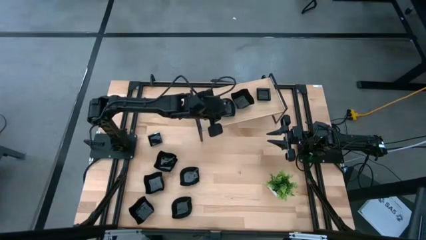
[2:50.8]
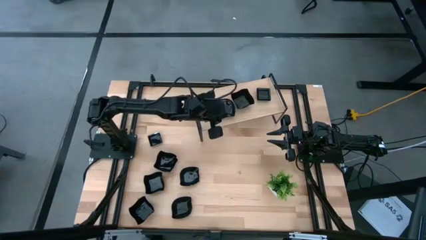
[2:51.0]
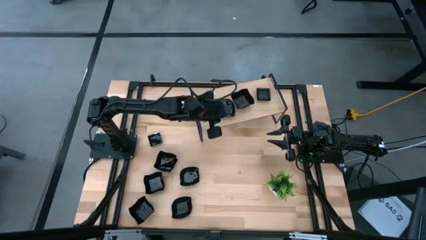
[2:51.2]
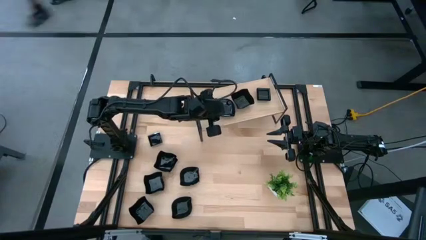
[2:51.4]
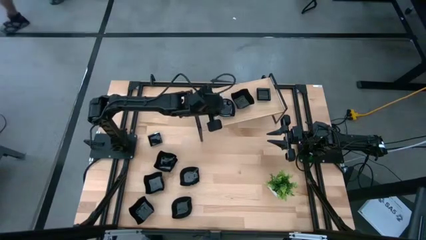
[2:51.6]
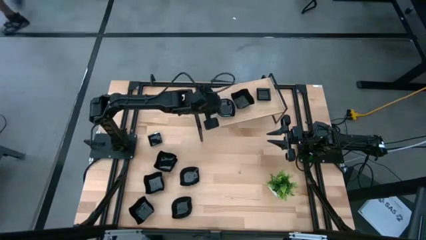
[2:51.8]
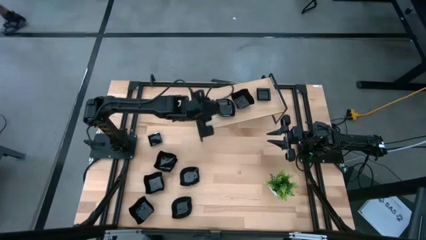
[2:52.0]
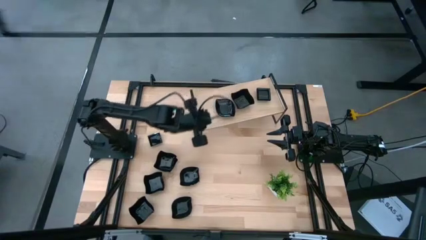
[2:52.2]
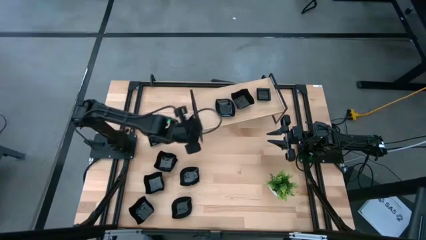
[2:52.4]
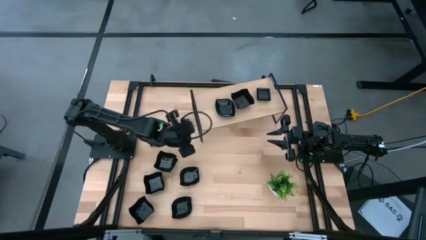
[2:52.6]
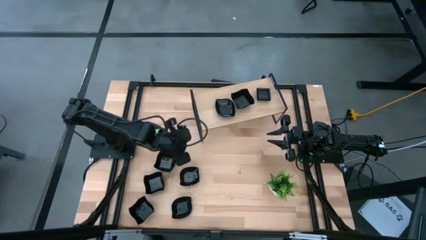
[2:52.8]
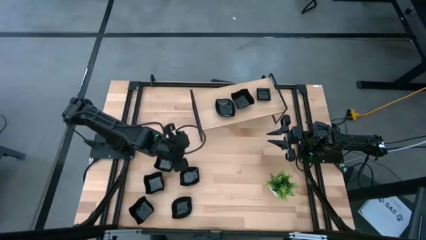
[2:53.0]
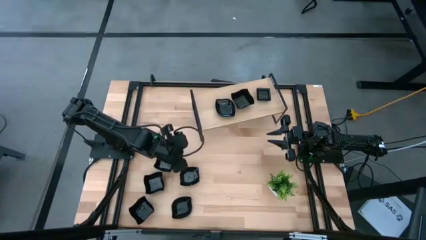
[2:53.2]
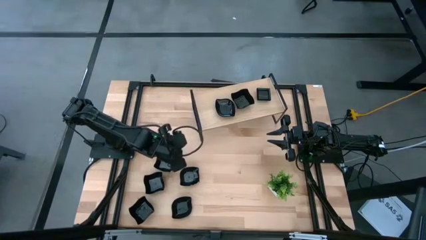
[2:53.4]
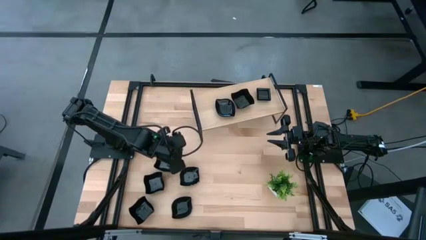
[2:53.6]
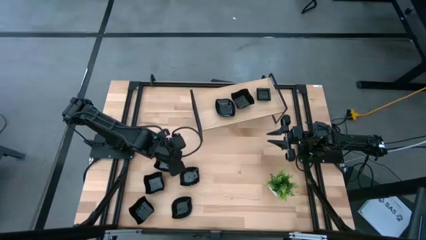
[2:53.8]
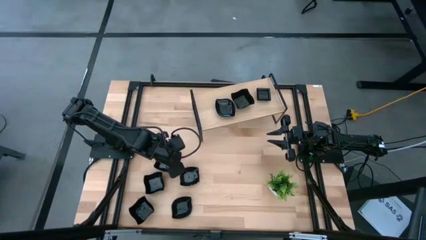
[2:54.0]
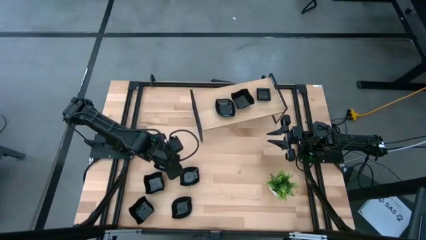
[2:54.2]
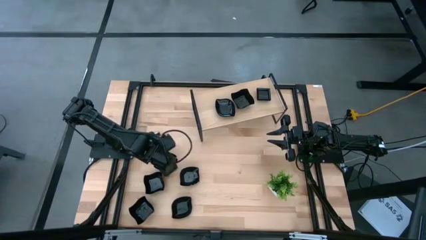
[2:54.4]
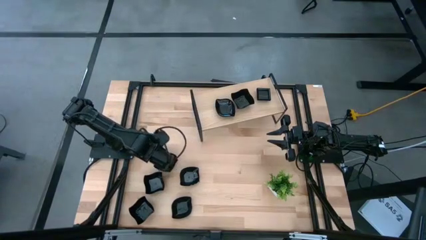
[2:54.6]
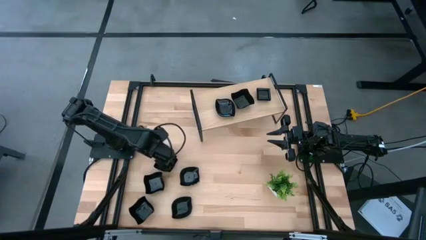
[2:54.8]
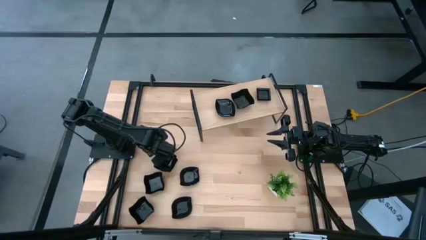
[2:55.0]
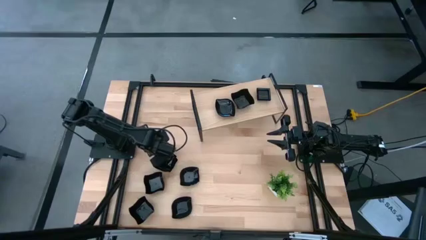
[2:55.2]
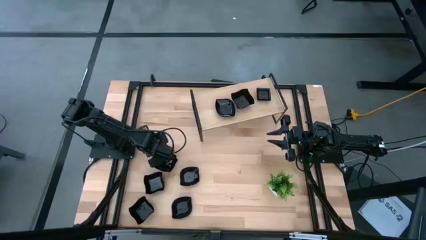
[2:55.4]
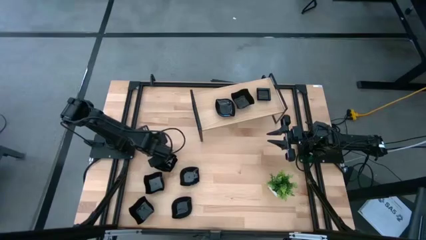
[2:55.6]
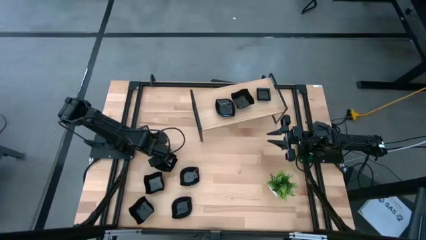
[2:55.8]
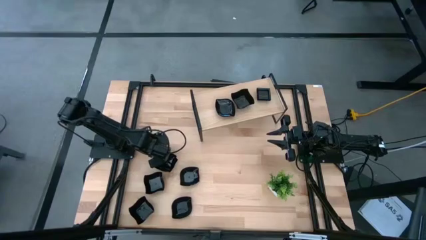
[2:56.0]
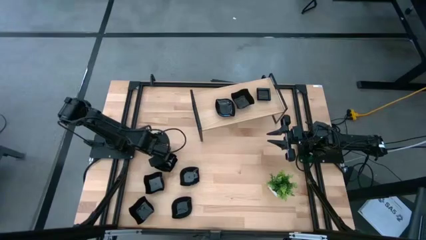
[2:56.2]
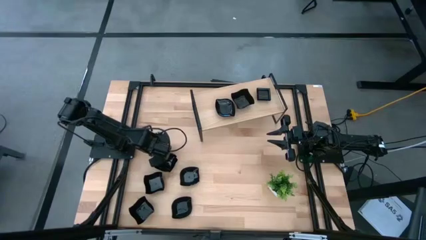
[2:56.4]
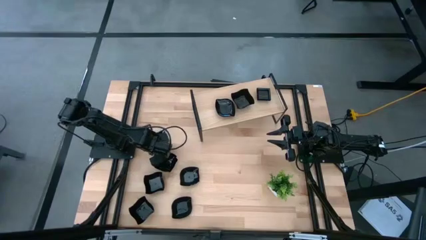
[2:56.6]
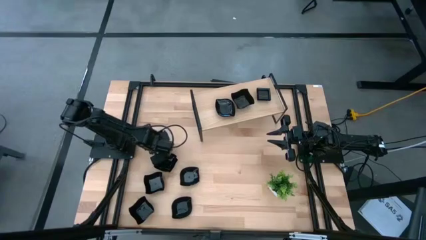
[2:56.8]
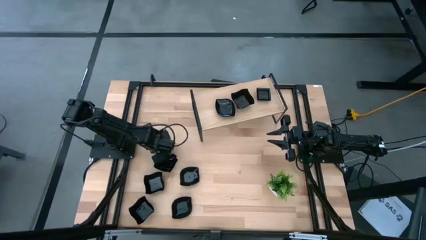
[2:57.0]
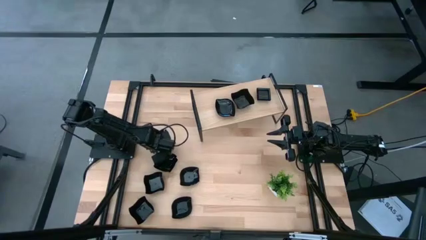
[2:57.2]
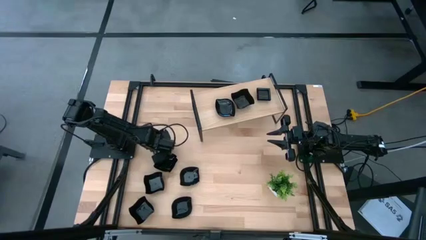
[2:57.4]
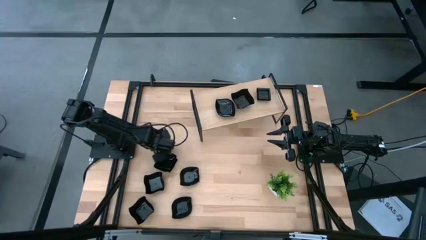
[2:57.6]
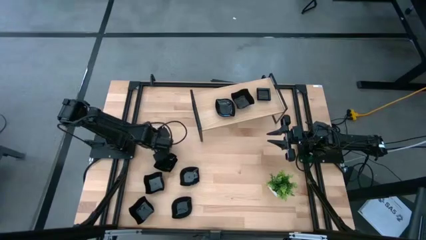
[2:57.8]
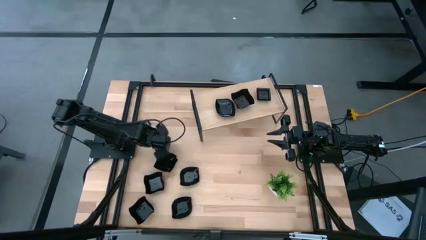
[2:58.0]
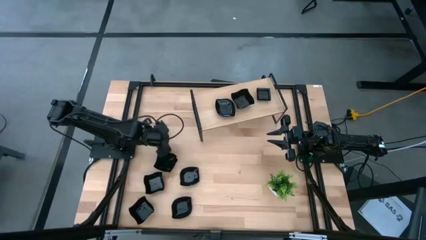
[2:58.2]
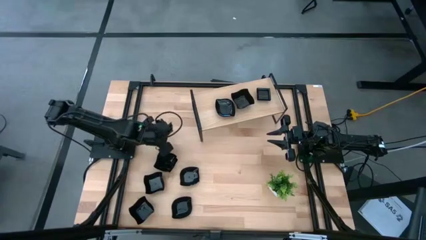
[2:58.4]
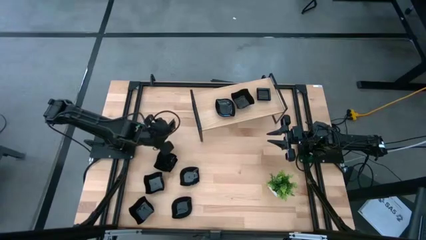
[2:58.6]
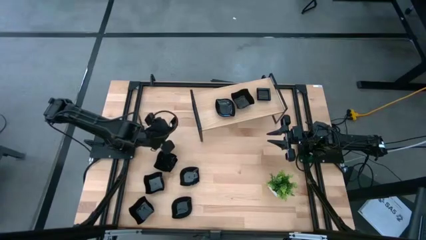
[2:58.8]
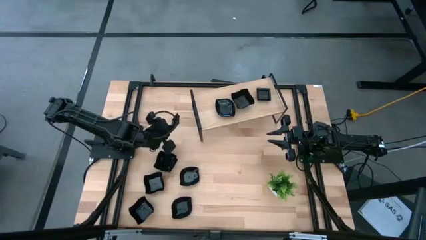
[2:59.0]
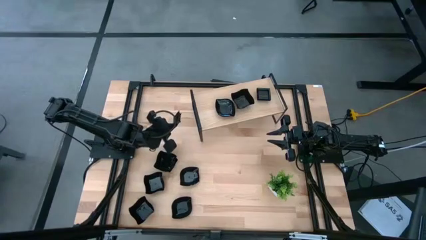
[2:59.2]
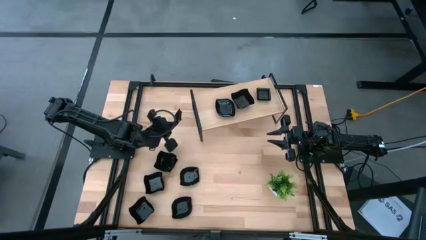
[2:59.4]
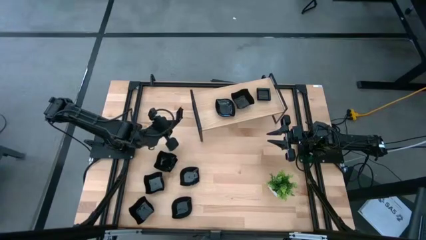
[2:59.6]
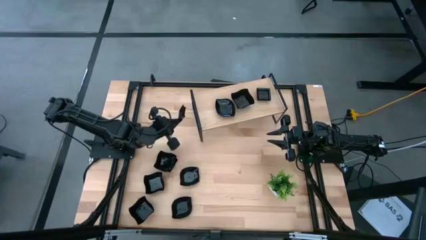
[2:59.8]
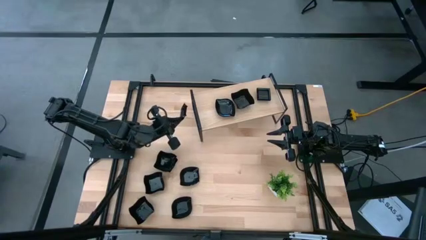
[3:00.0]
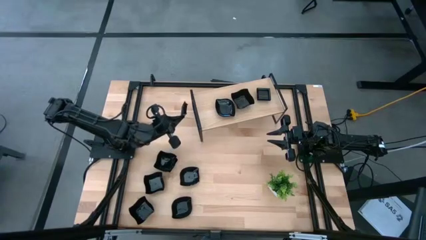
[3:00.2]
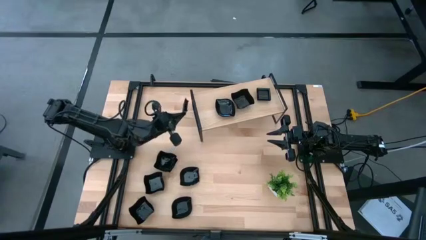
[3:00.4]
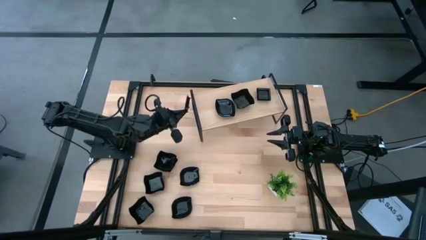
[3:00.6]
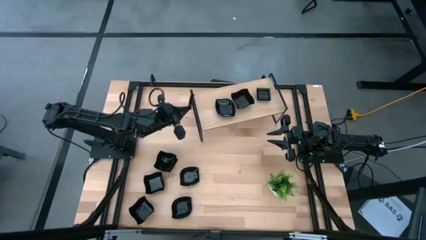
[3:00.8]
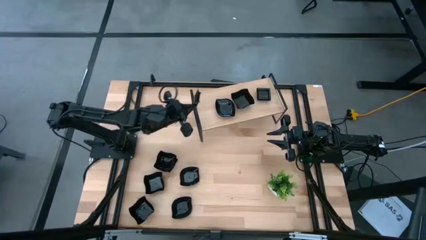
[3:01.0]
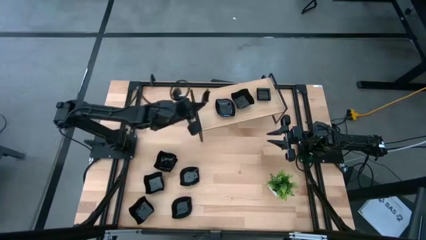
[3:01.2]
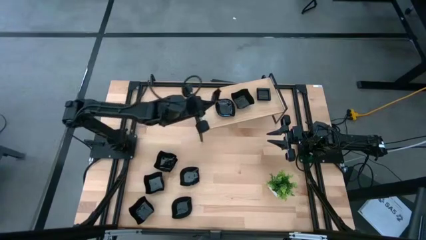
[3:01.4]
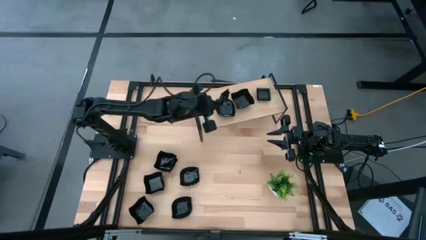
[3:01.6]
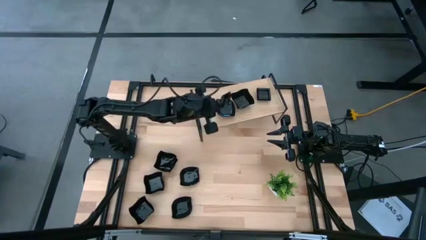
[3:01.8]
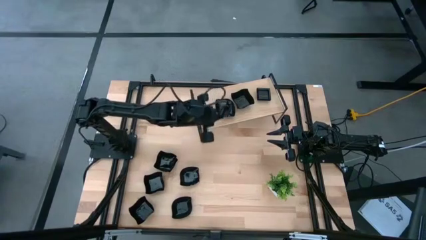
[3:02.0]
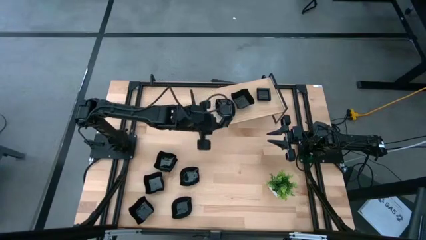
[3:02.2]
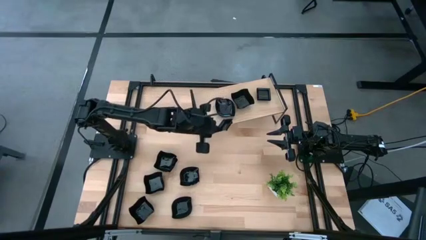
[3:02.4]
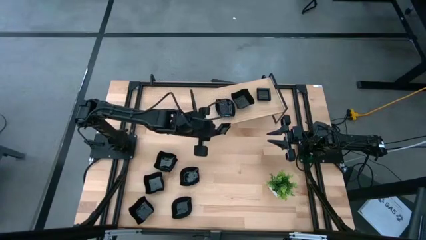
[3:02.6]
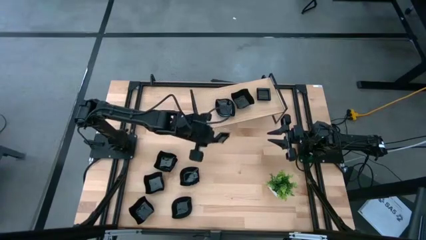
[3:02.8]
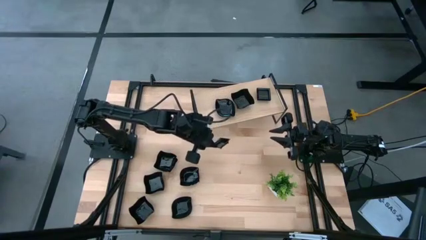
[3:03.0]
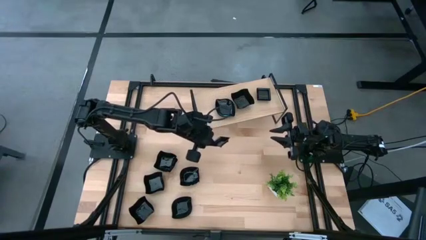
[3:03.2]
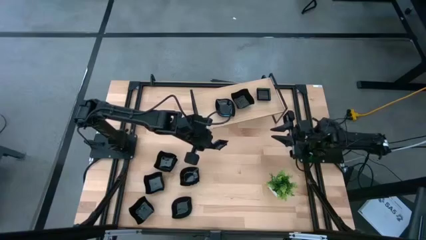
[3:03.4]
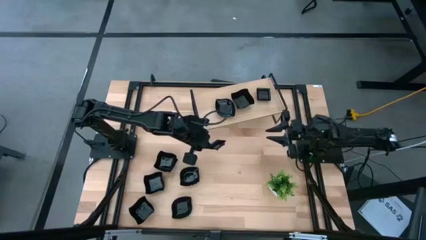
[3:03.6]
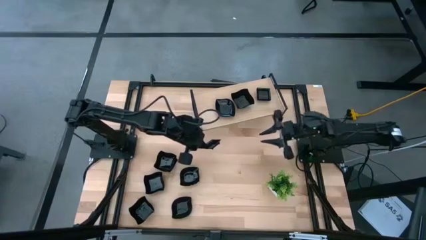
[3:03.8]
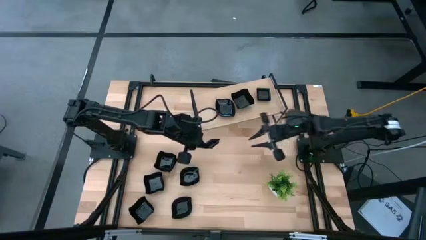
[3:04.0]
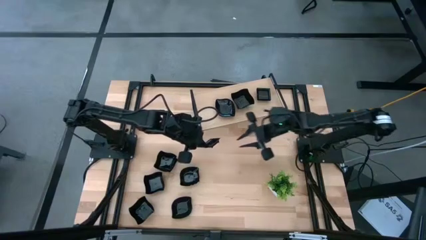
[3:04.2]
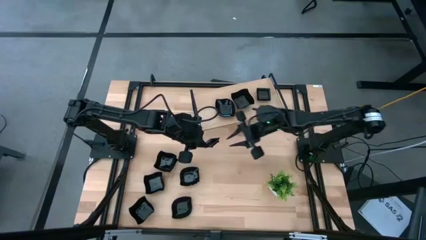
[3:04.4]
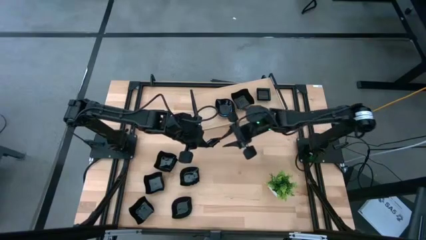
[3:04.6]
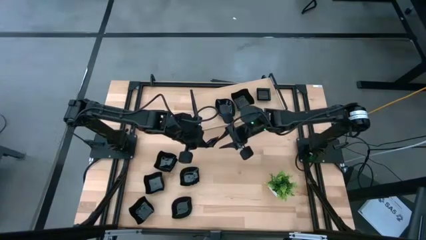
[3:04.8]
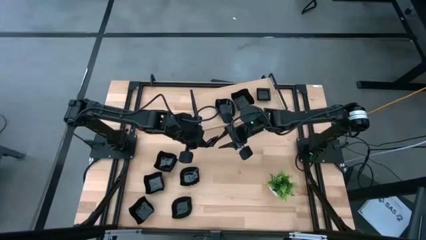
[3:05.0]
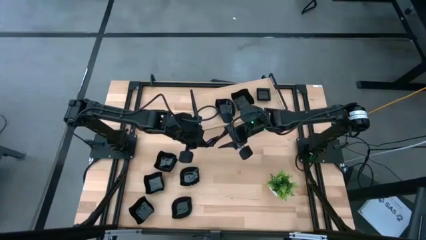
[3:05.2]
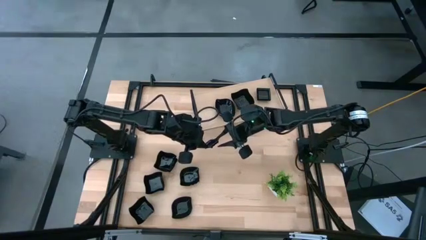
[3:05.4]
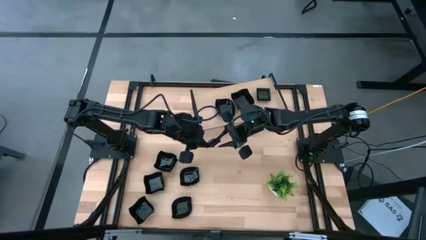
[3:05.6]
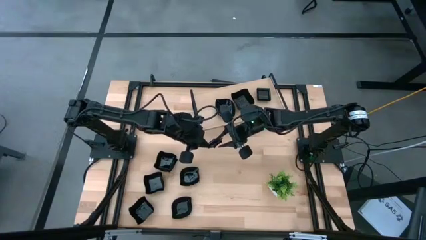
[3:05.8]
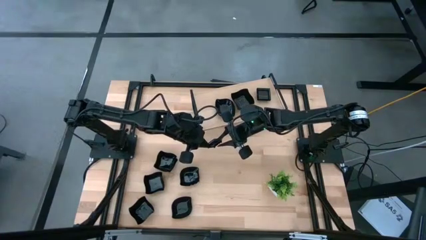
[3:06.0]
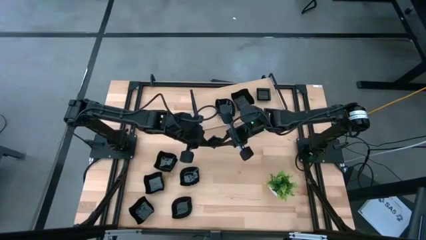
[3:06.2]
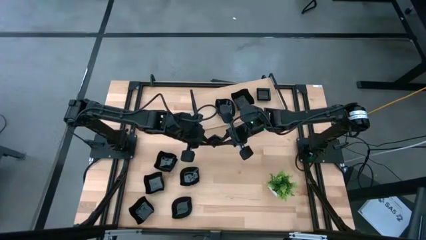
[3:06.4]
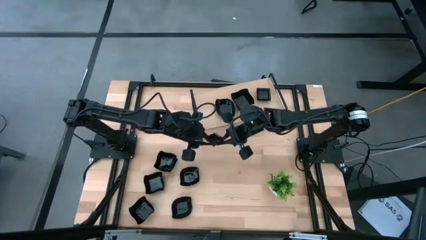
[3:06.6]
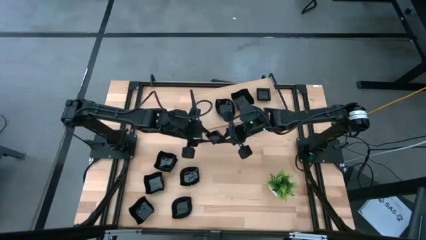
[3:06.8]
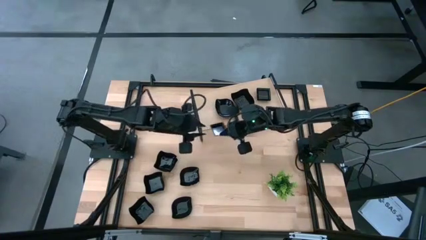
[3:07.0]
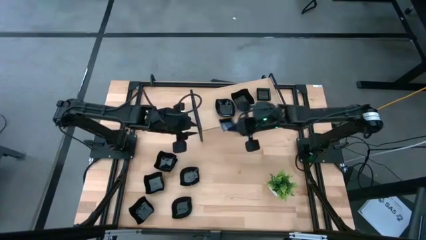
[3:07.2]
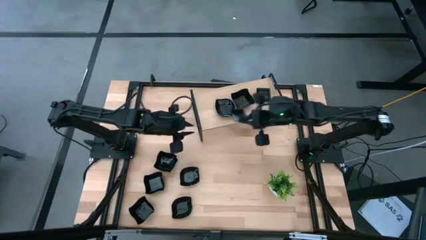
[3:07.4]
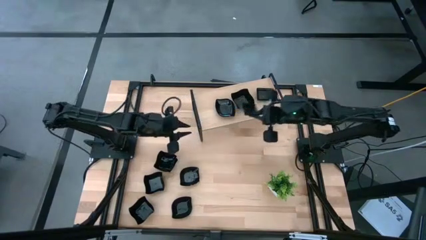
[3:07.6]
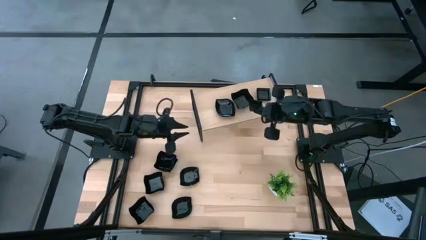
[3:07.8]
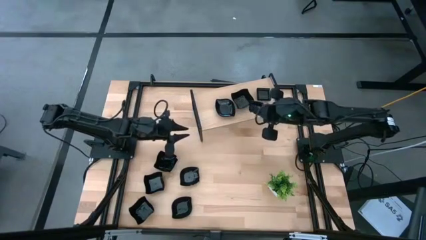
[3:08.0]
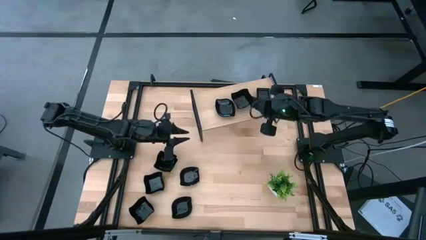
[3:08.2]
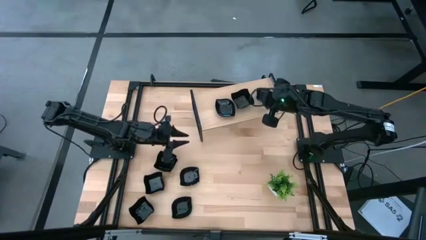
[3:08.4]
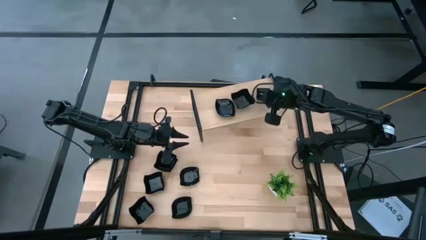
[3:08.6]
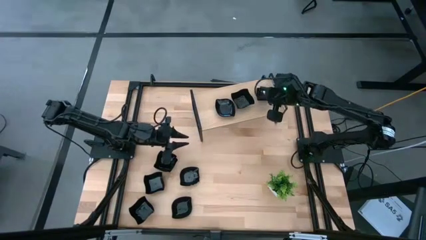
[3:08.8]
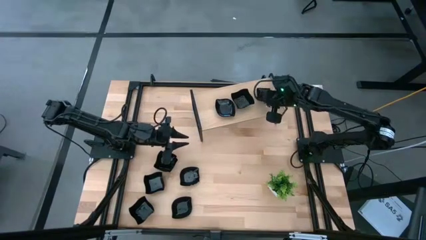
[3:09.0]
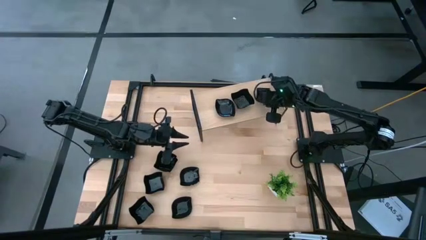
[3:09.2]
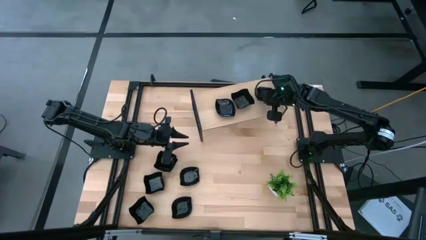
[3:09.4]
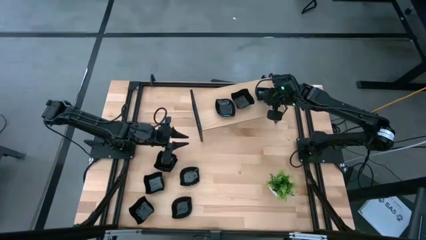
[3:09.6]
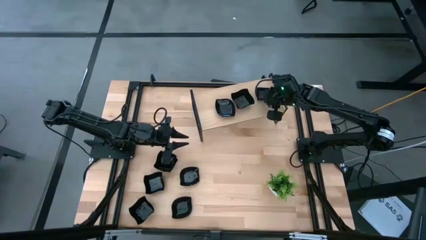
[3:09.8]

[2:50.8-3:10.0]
Task: Pick & Place Mini shaped plates
Stack the square plate on top of the square plate on the shelf
